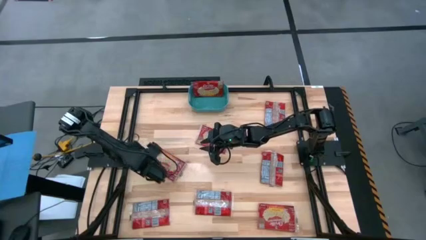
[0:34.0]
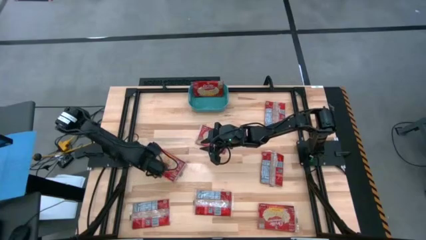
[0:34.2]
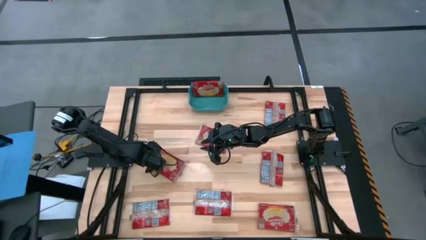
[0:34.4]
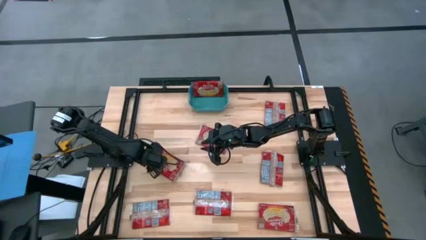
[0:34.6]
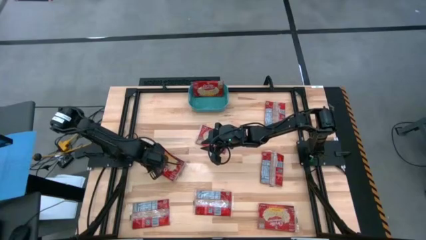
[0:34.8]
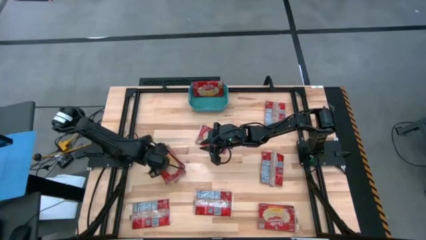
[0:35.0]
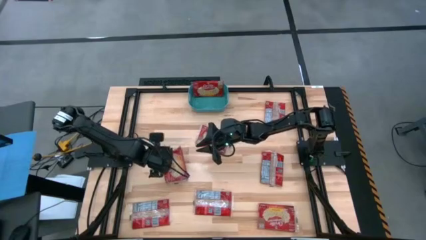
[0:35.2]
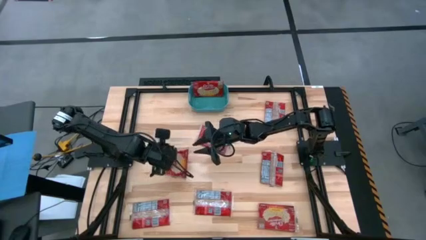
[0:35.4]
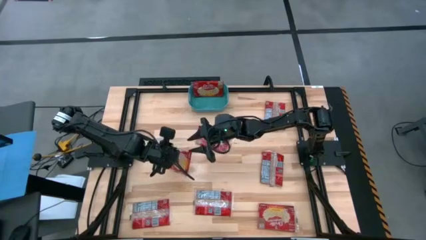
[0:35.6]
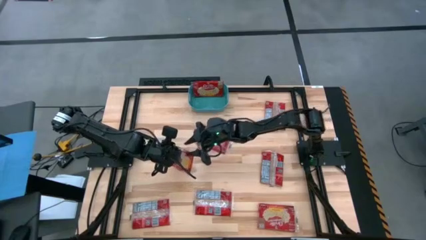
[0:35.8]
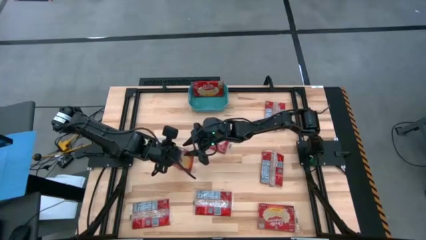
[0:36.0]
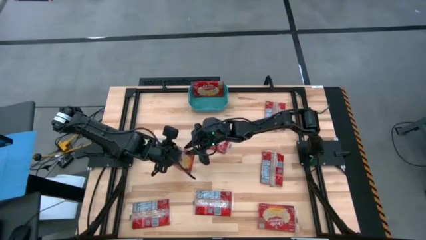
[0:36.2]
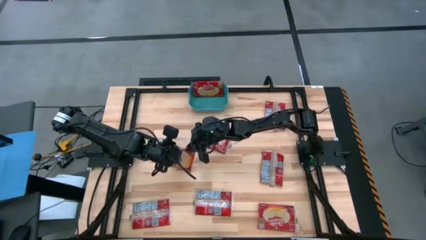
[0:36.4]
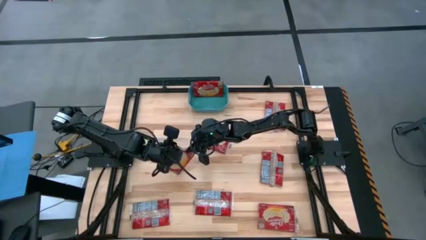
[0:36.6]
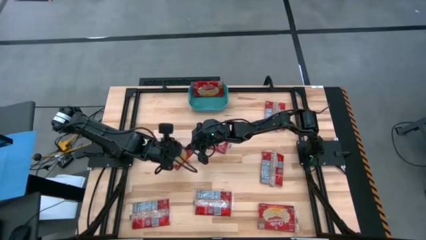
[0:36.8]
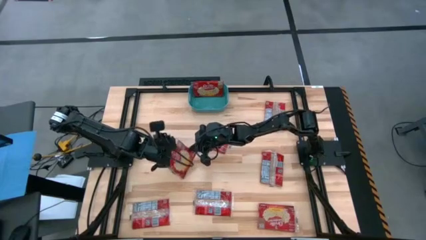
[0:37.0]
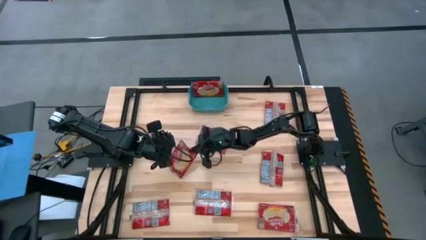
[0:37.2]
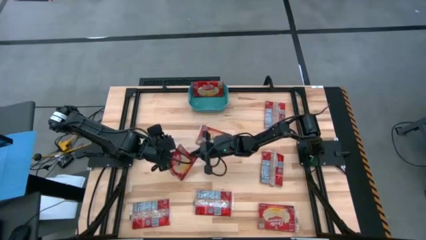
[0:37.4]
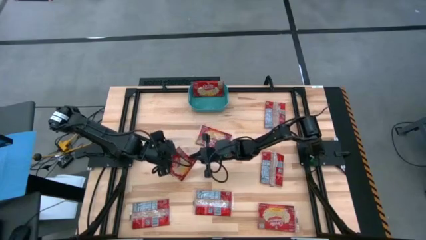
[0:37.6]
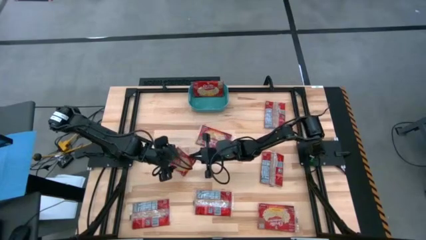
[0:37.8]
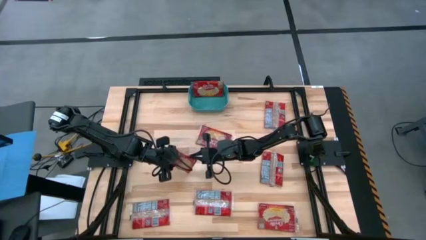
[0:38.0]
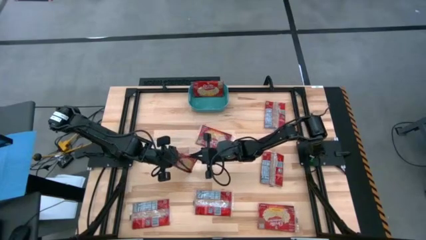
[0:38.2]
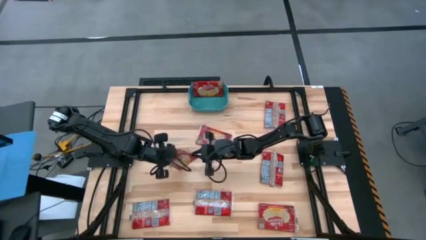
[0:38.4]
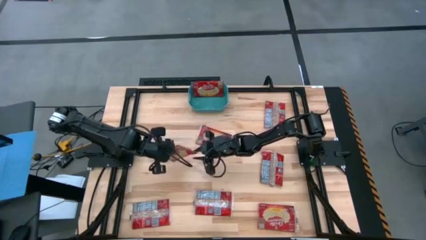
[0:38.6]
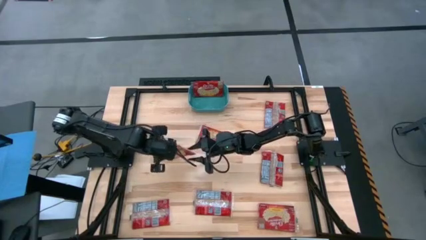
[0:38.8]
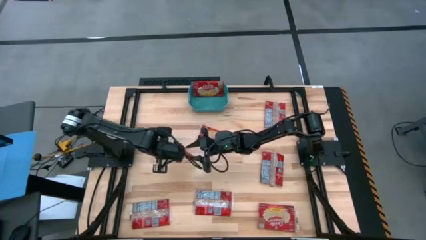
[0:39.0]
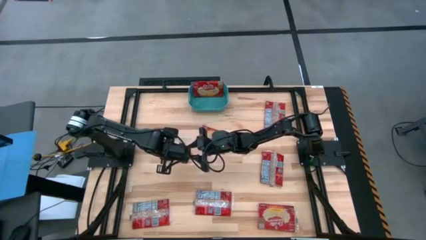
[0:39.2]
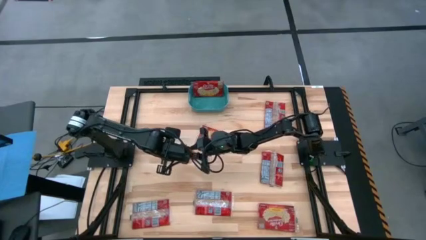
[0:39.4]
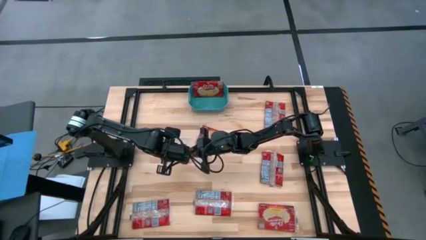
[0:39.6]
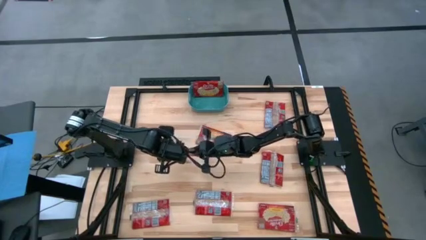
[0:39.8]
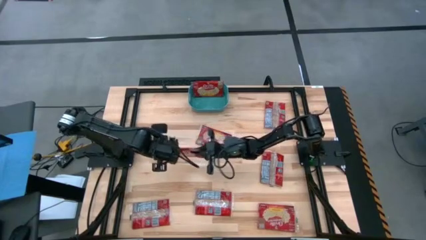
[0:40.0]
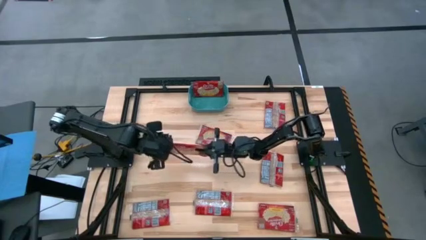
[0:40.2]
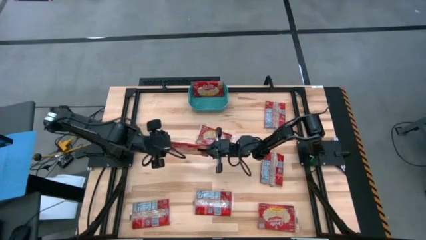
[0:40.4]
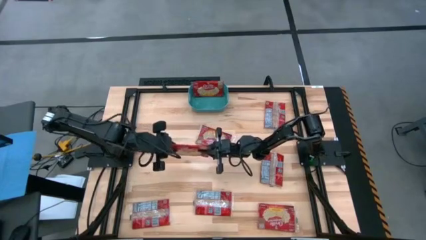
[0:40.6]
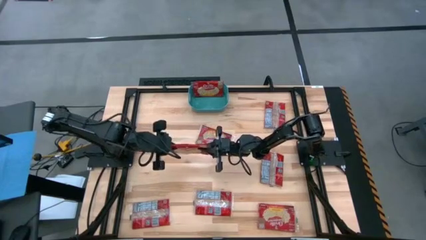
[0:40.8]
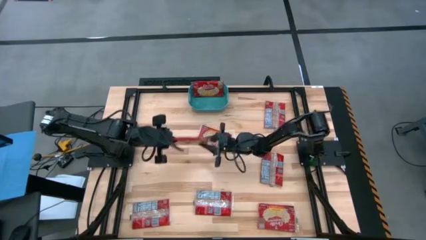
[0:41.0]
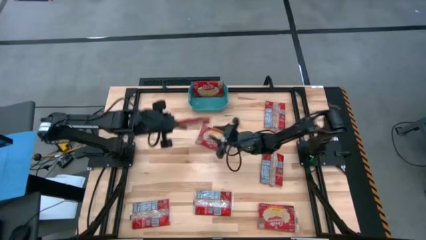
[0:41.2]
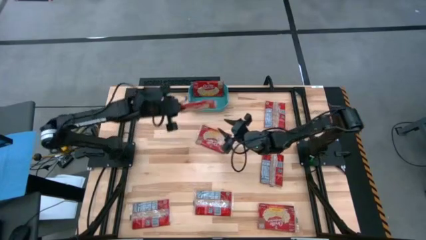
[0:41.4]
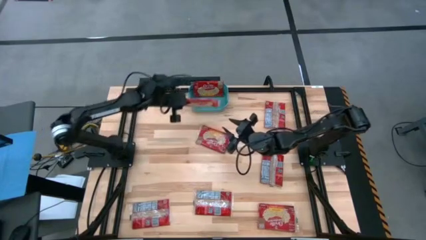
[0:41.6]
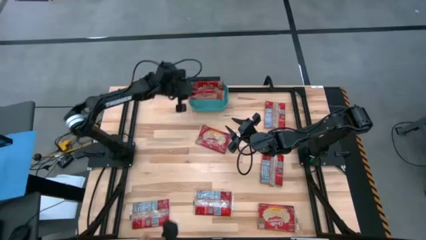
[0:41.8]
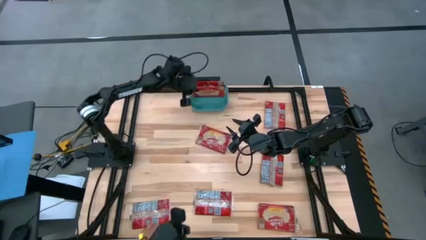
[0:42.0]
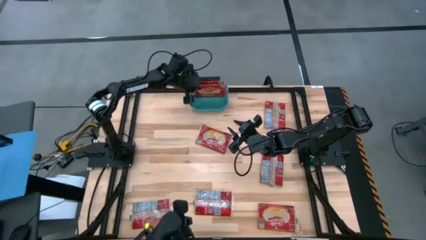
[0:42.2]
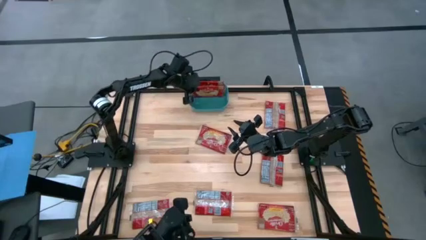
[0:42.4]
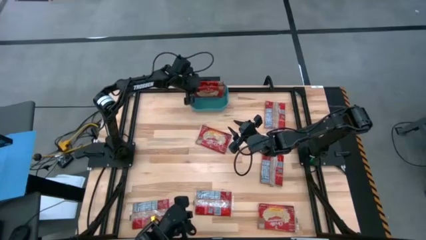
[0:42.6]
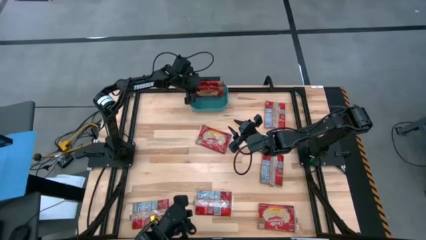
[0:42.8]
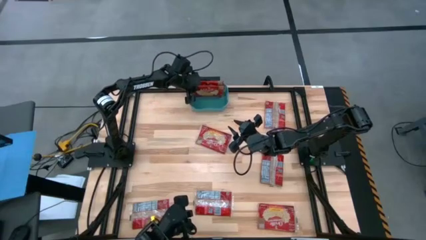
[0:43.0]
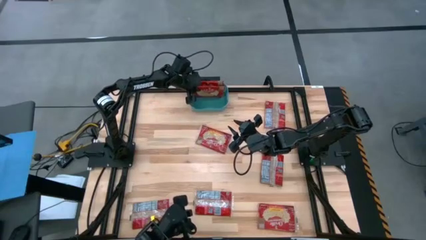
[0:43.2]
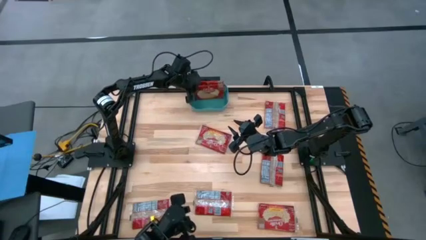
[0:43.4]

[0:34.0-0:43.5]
Task: Sort popcorn bags into baskets
Put the red popcorn bag into the green basket
